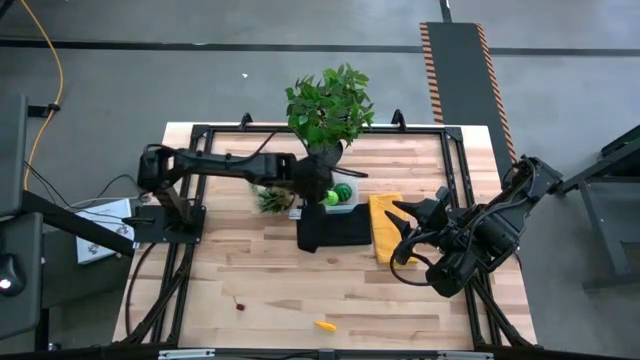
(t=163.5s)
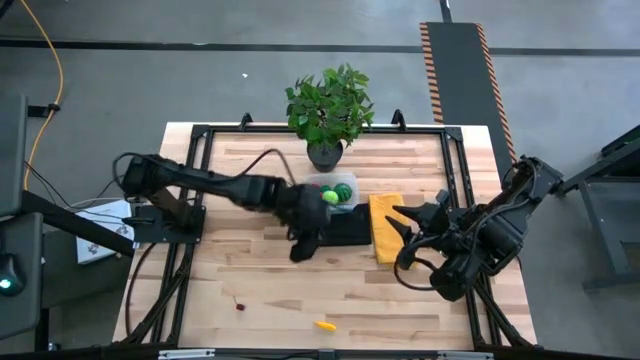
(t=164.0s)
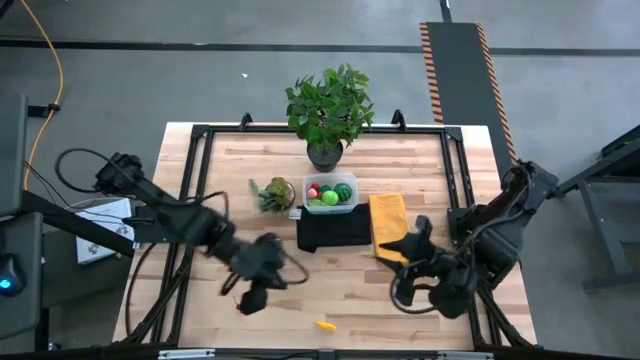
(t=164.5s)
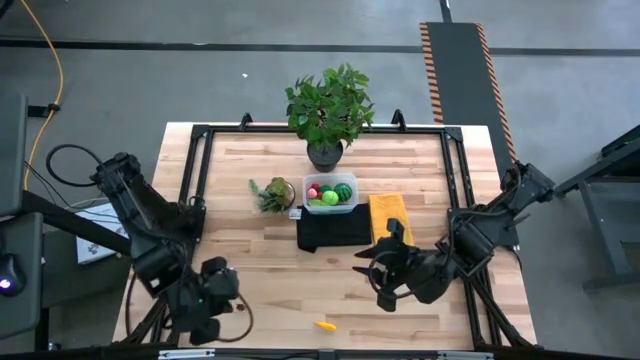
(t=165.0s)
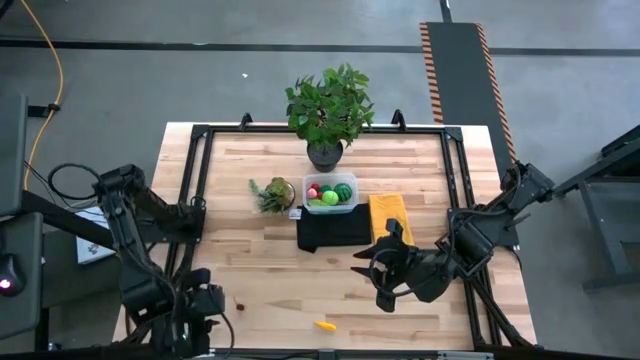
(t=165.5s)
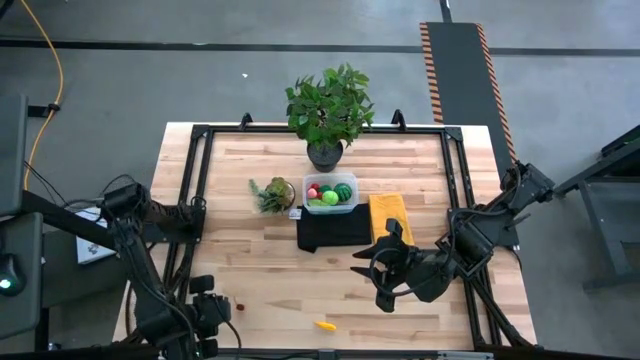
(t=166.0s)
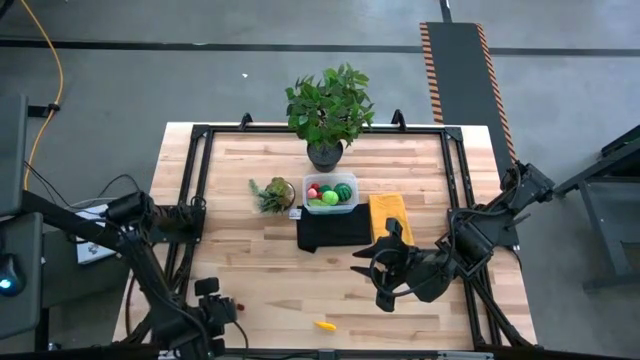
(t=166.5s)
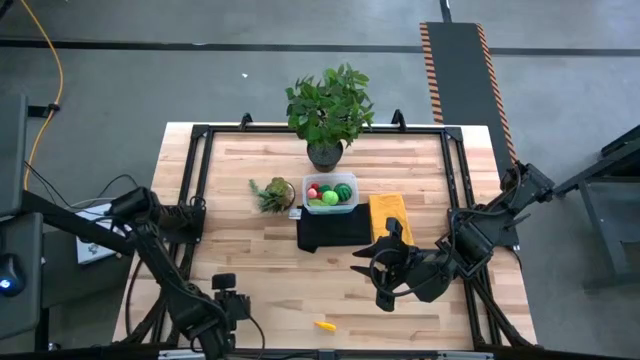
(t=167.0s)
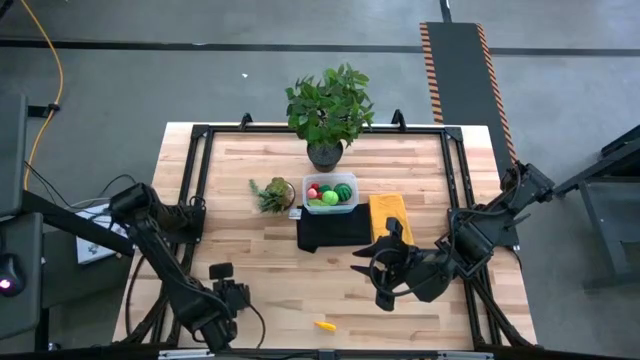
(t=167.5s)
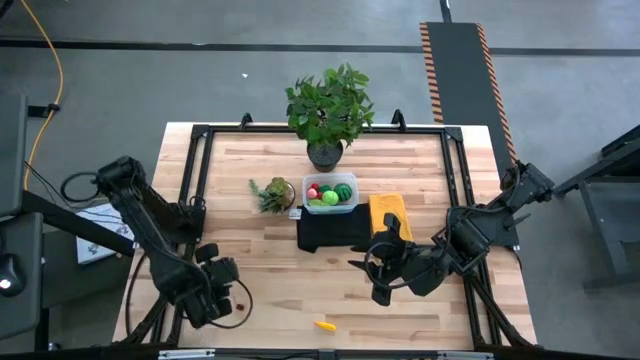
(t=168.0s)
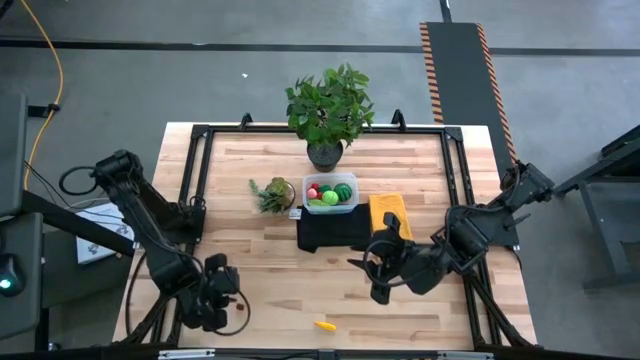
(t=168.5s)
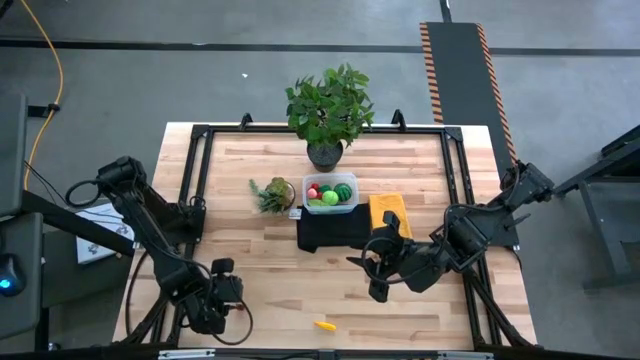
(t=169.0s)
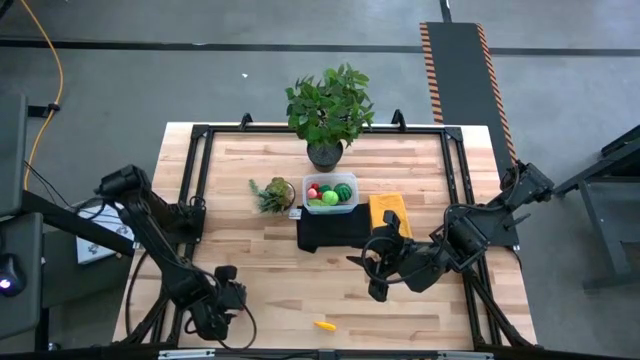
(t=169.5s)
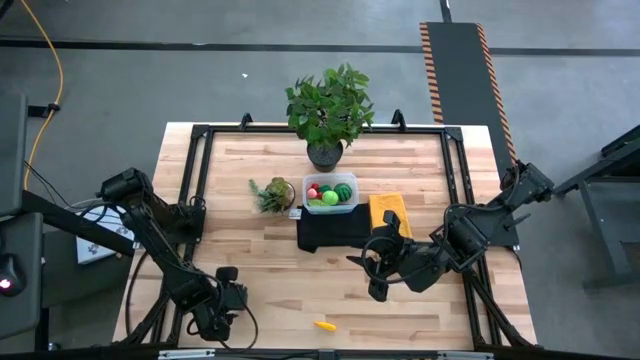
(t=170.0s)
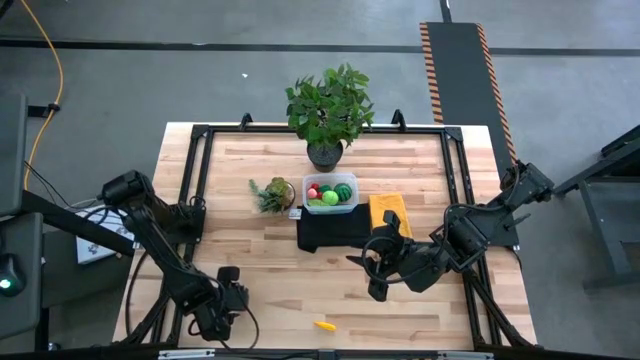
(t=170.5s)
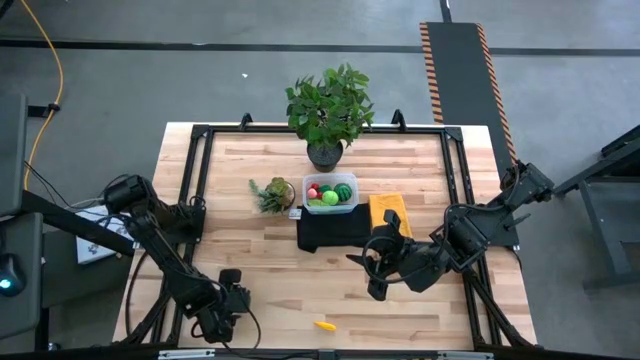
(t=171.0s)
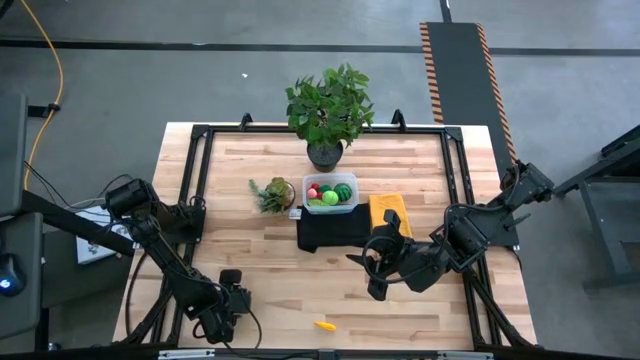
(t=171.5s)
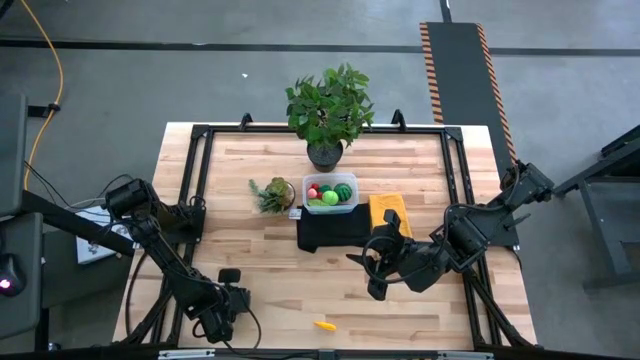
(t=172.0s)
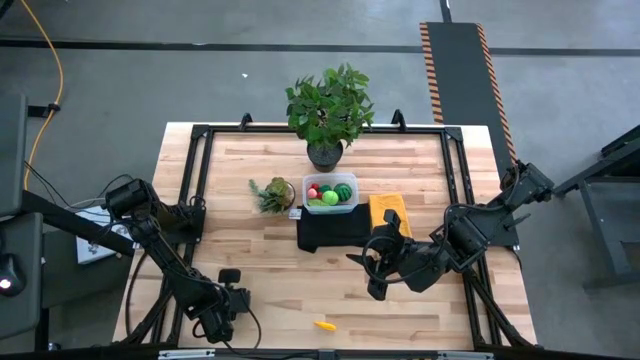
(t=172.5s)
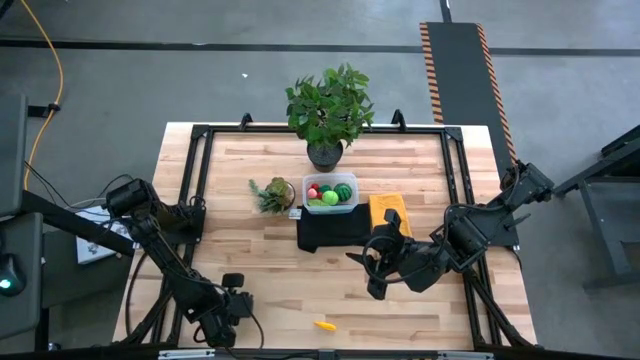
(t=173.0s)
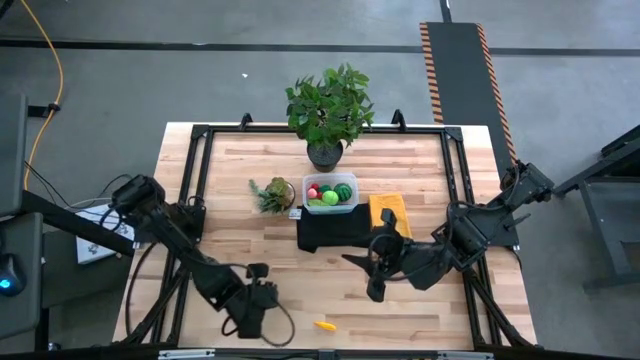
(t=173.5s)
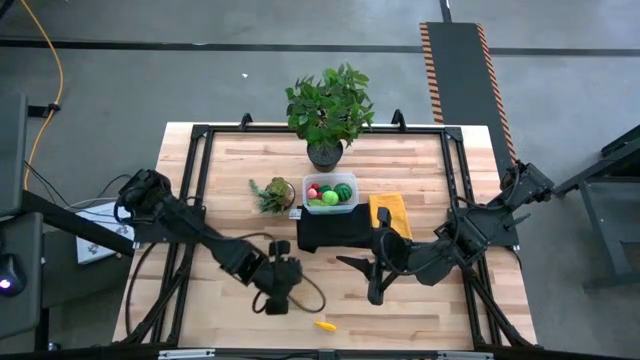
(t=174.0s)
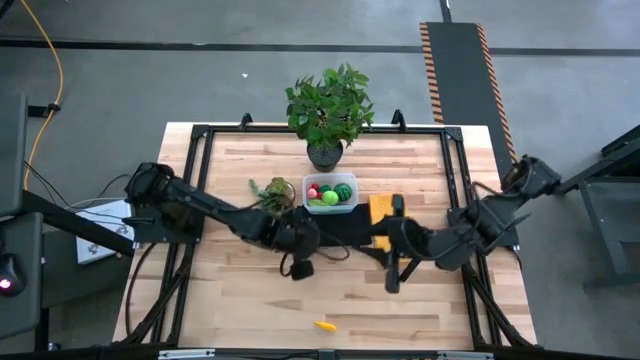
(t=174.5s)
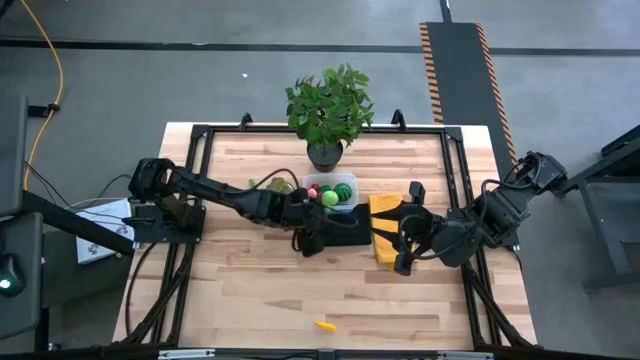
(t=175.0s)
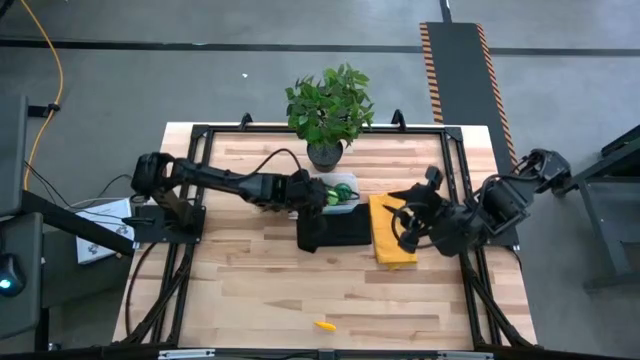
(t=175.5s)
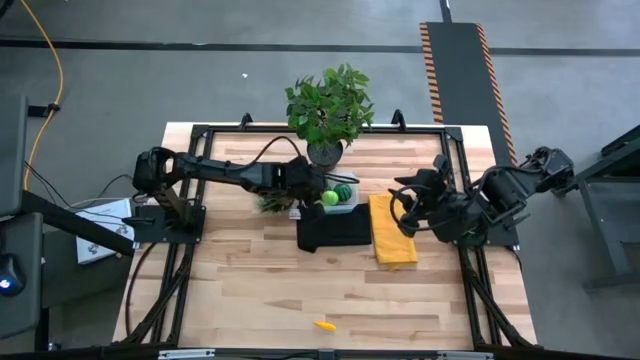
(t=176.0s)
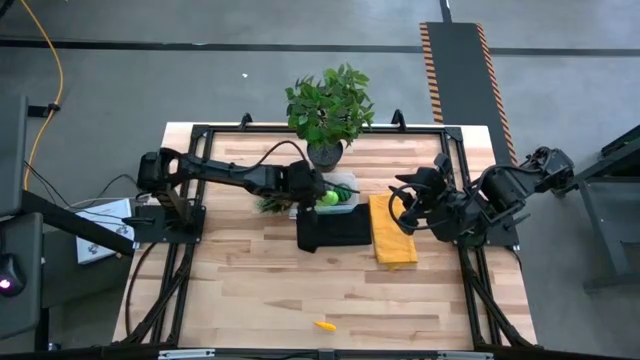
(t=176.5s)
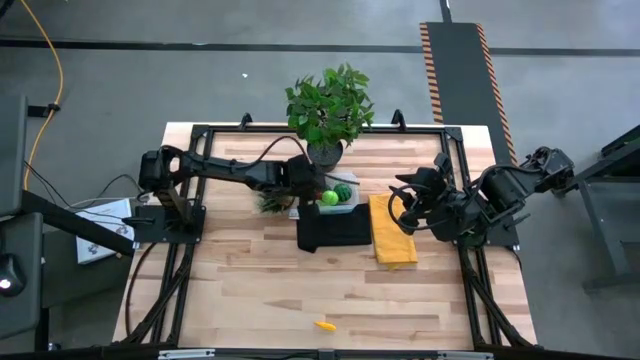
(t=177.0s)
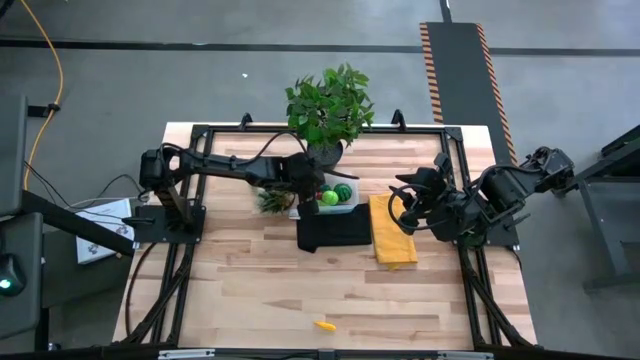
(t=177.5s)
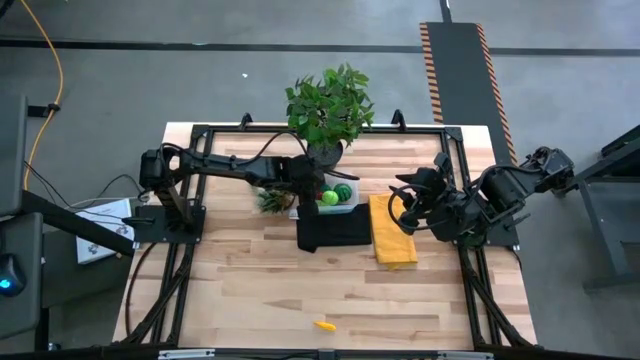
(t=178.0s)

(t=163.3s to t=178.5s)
Task: Pick and placing Produce into tupperware
Put the dark red cherry into the transparent bin

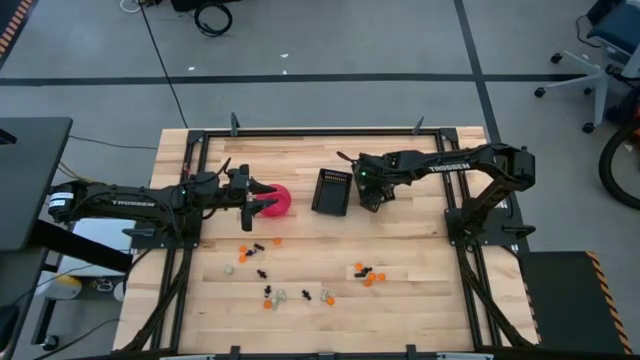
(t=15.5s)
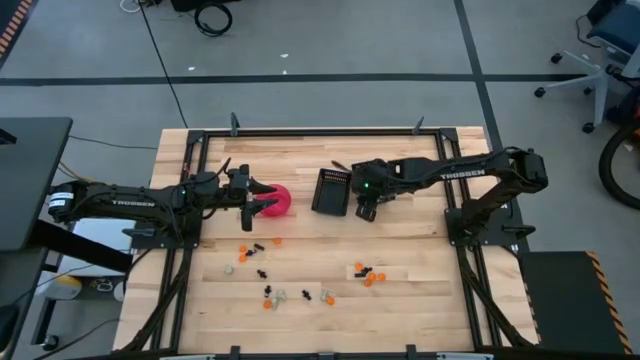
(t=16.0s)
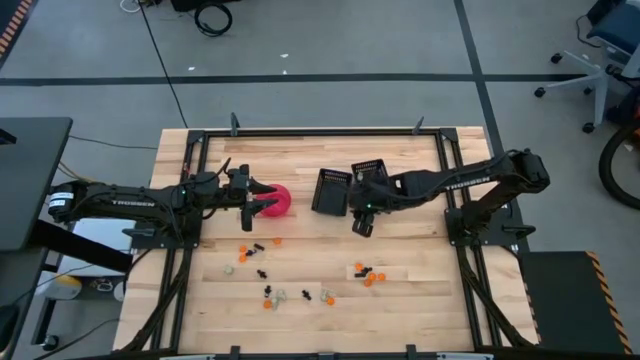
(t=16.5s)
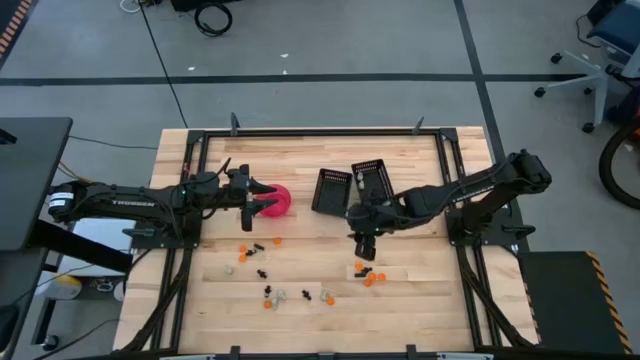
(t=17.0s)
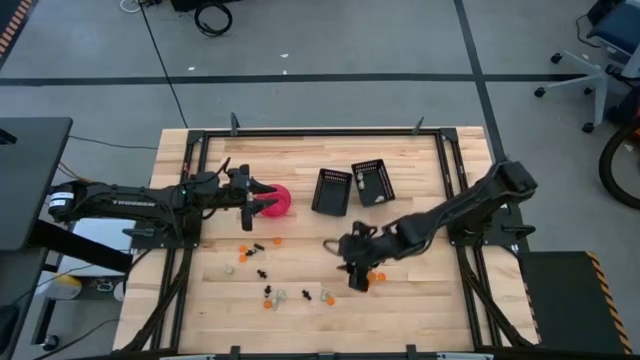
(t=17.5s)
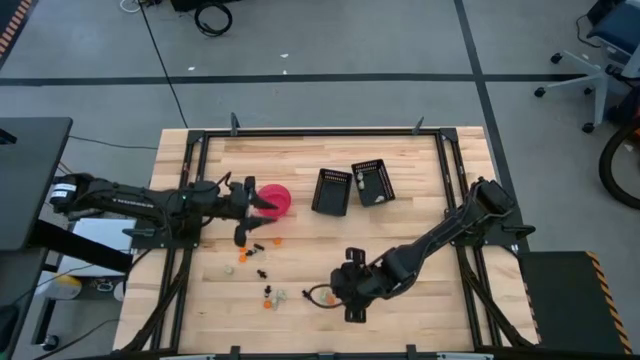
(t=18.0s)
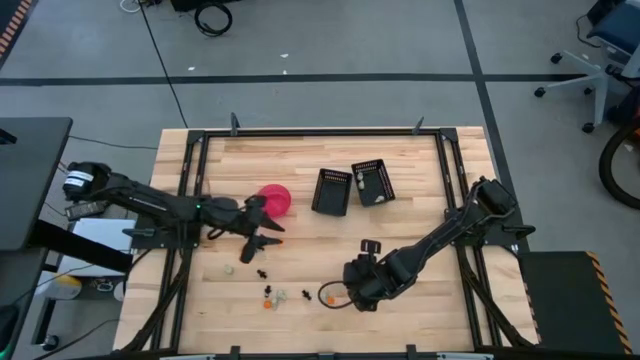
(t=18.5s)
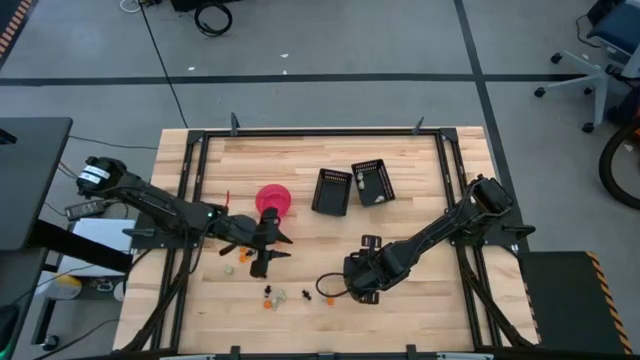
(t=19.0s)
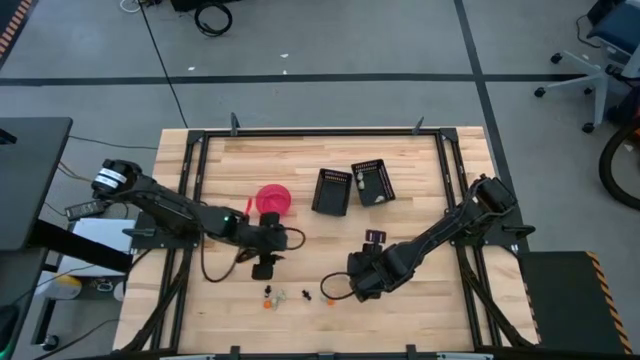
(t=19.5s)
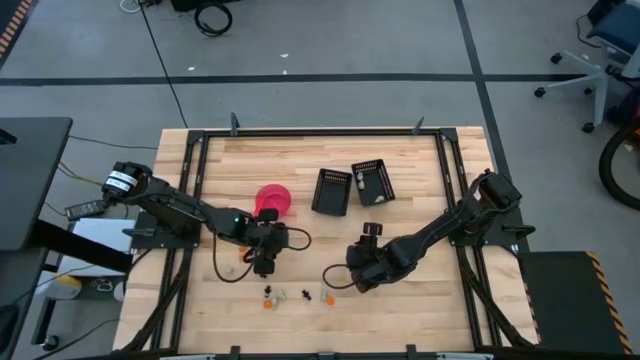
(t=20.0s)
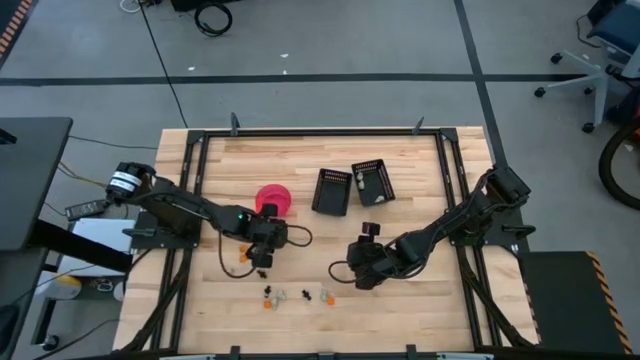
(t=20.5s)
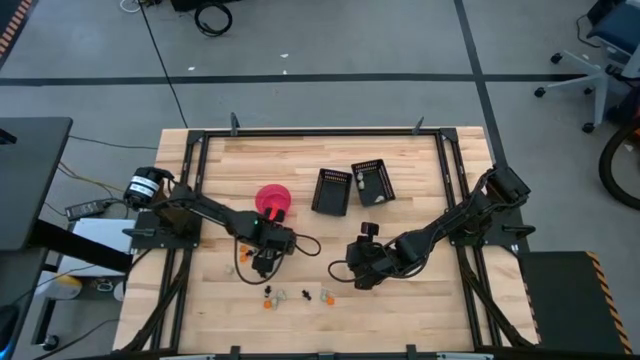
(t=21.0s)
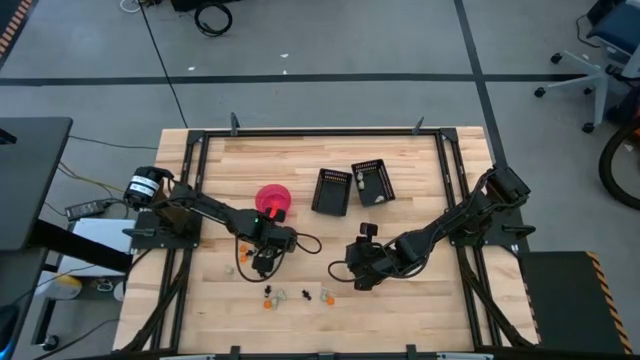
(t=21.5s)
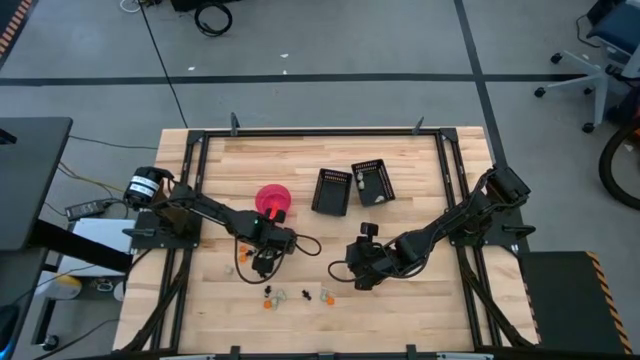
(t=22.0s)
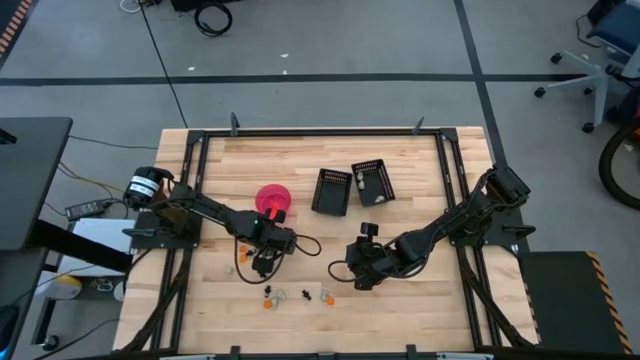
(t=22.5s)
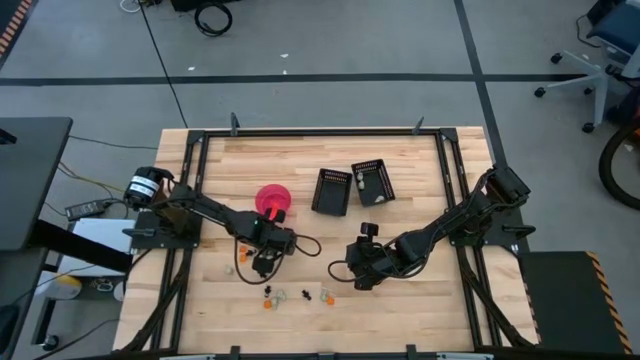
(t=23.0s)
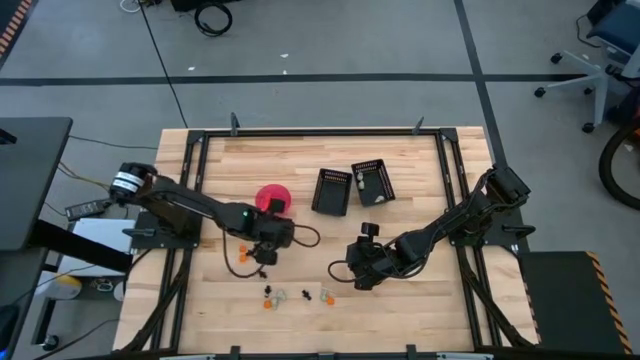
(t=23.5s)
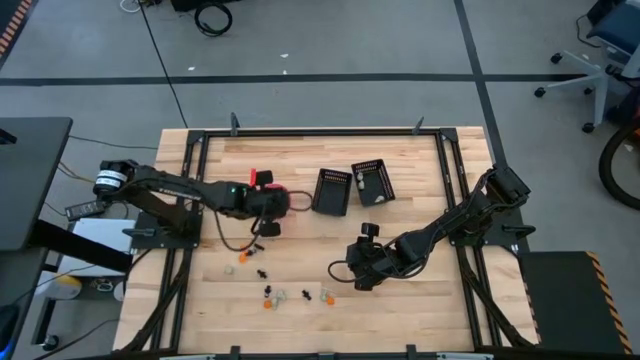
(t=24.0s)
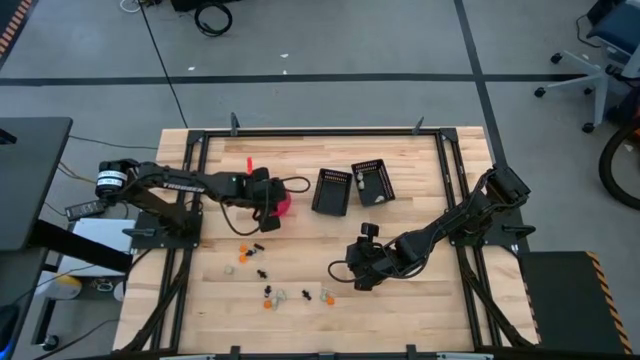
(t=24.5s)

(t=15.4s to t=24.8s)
Task: Sort Halloween decoration
Put the orange pumpkin toy into the red bowl
